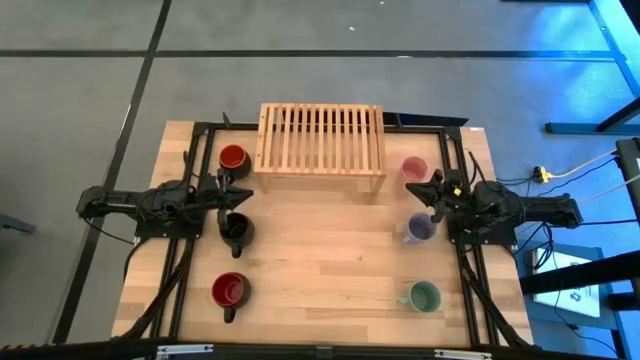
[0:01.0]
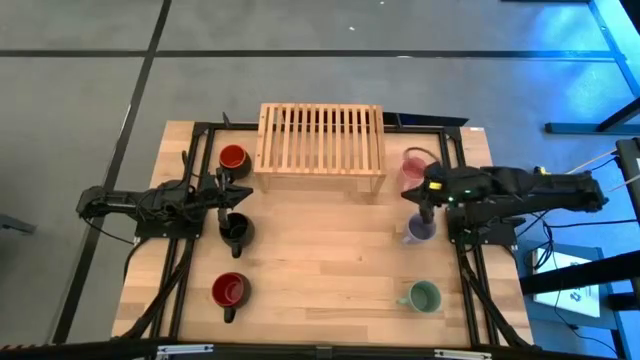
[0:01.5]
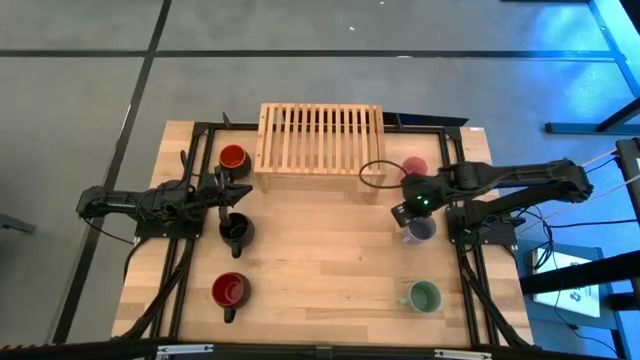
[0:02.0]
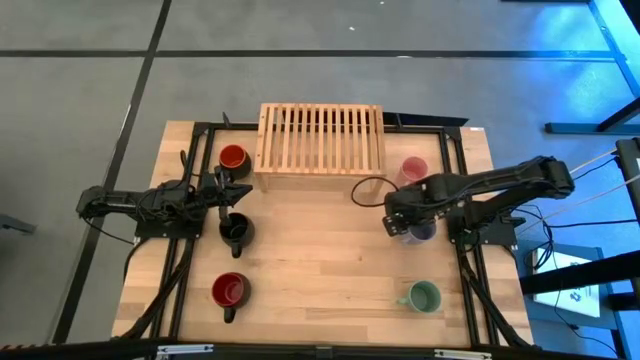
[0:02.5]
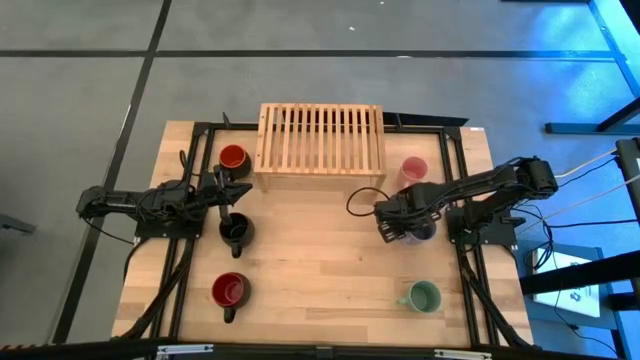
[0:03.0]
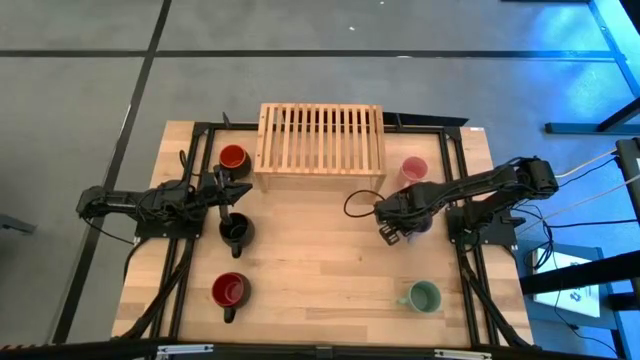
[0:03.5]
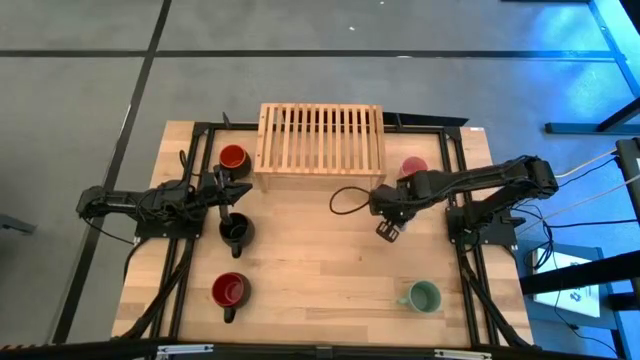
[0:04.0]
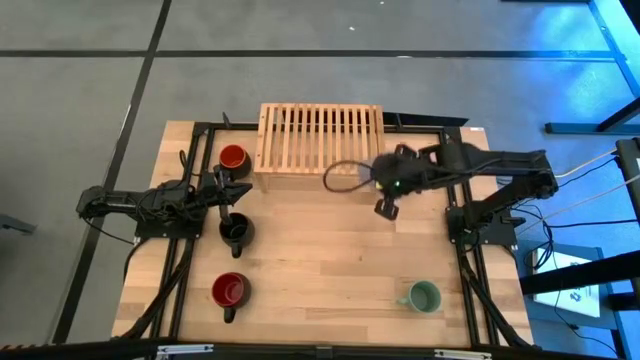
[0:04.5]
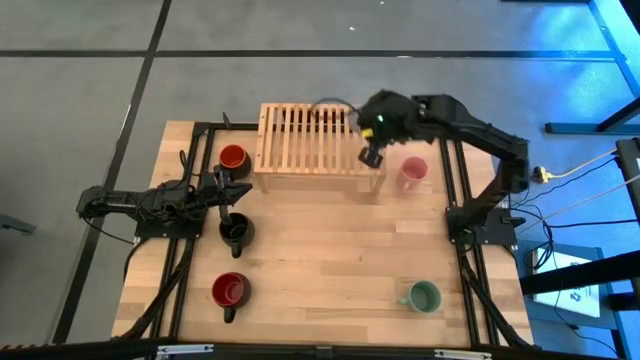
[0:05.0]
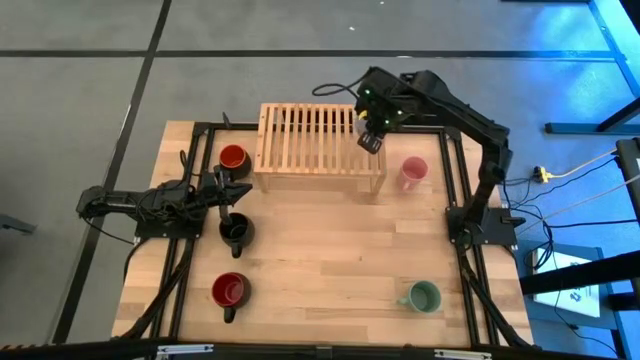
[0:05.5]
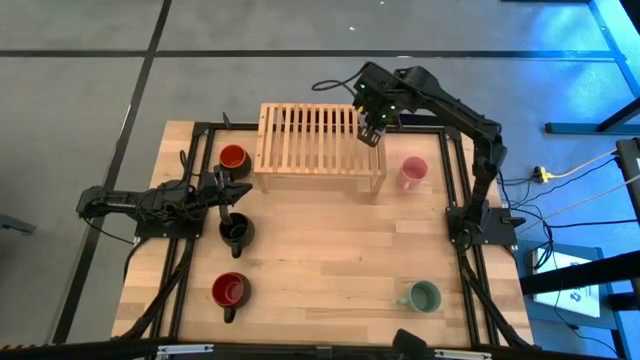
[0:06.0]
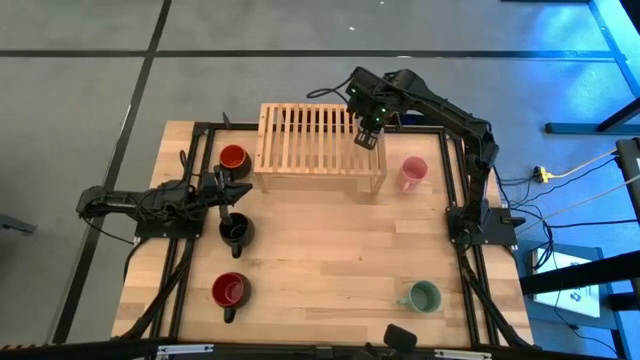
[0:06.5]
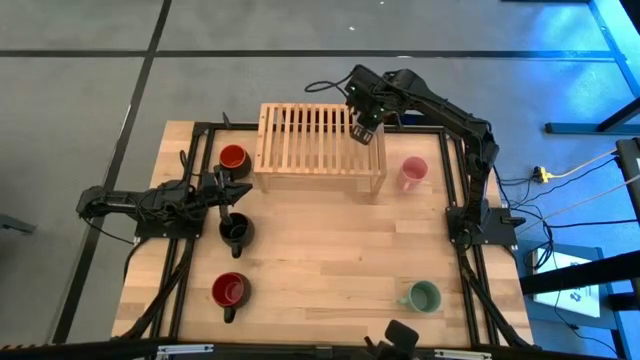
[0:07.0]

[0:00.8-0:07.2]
Task: Place coffee mugs
Put the blue mug on the shelf

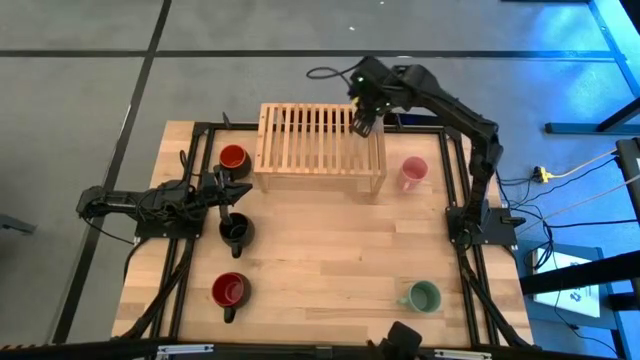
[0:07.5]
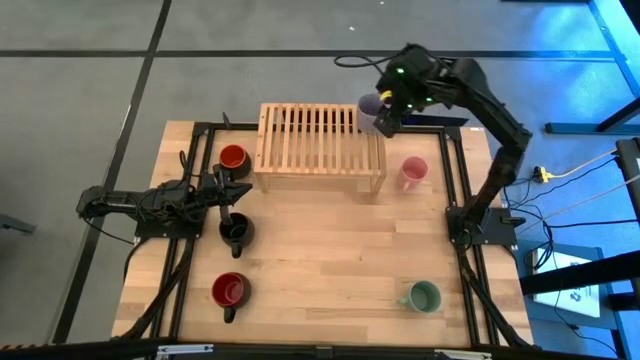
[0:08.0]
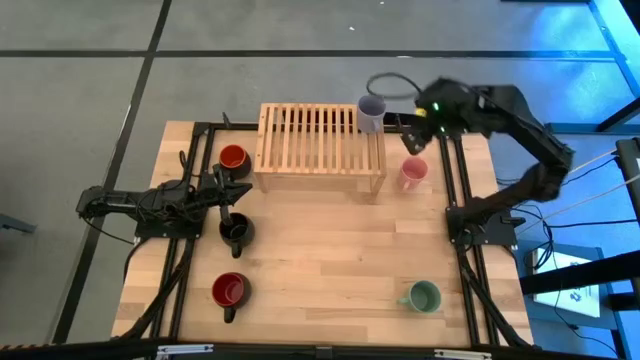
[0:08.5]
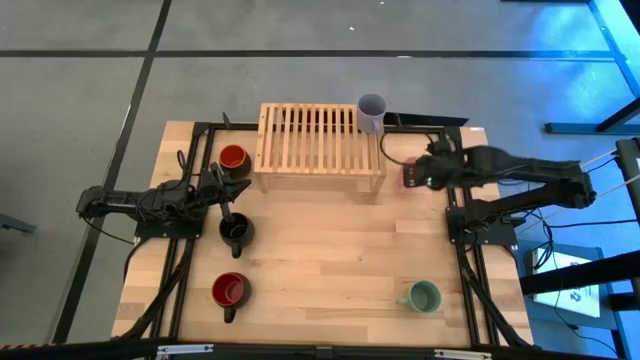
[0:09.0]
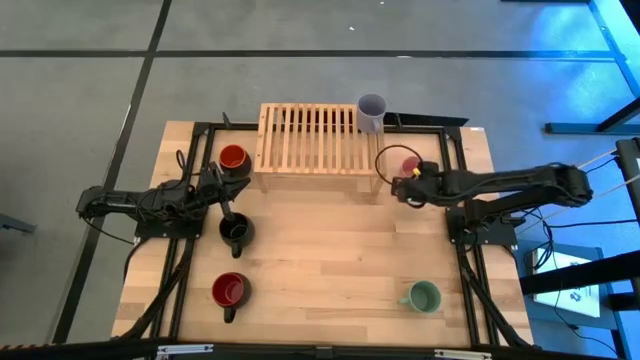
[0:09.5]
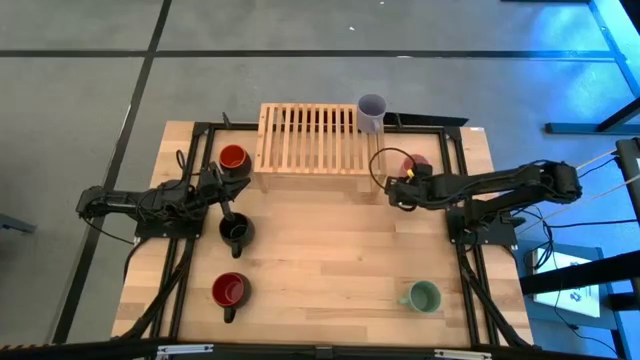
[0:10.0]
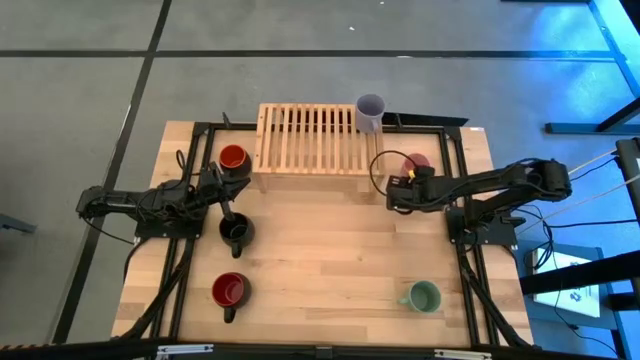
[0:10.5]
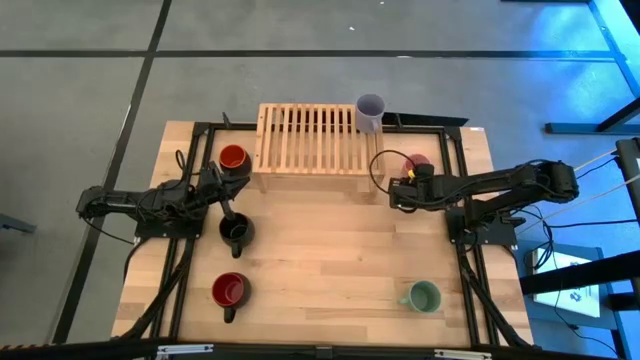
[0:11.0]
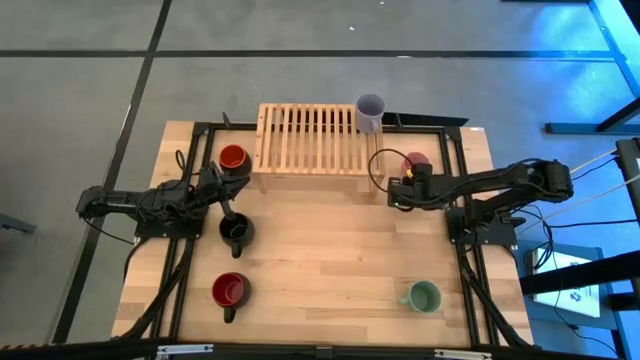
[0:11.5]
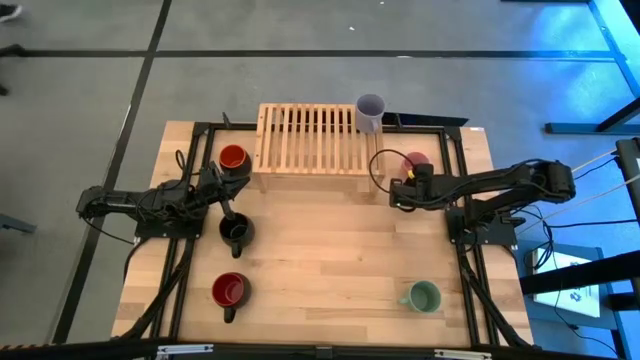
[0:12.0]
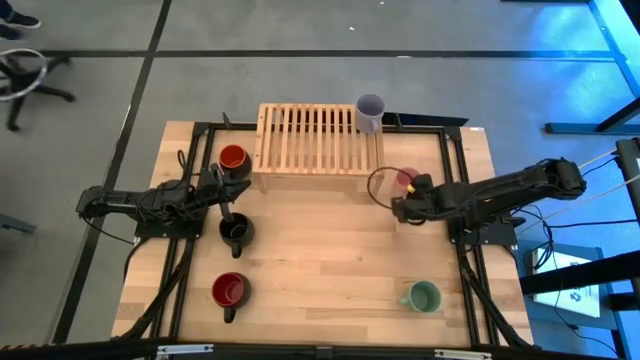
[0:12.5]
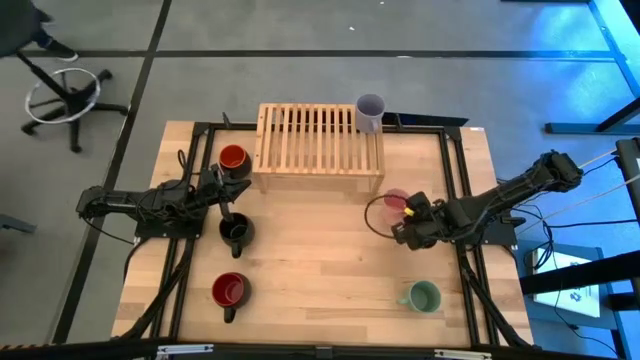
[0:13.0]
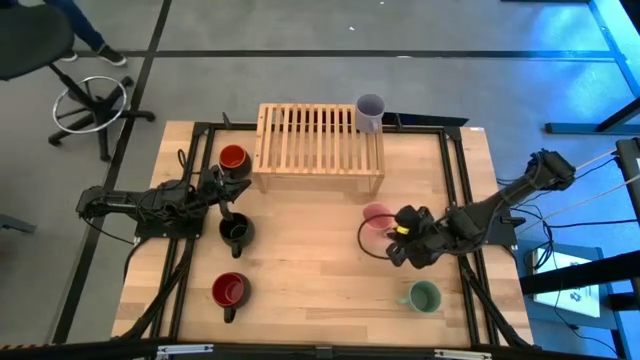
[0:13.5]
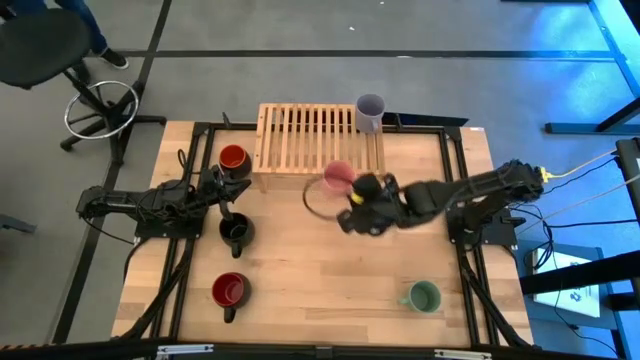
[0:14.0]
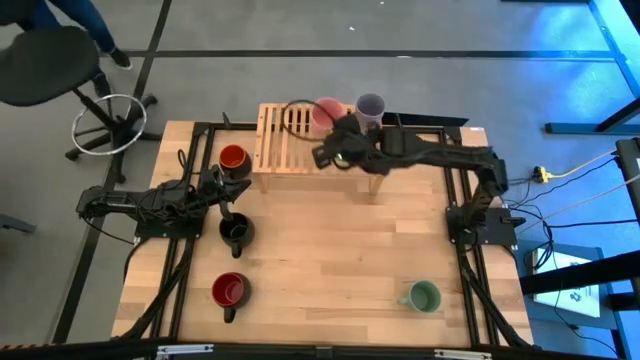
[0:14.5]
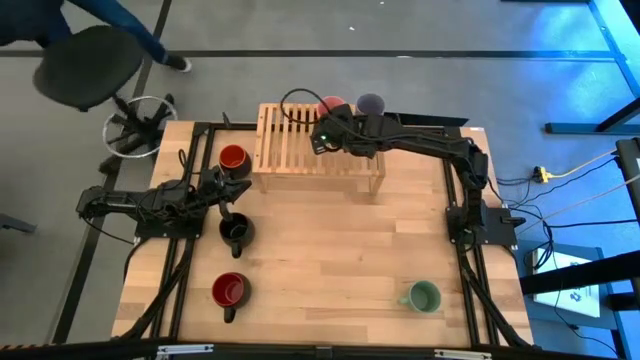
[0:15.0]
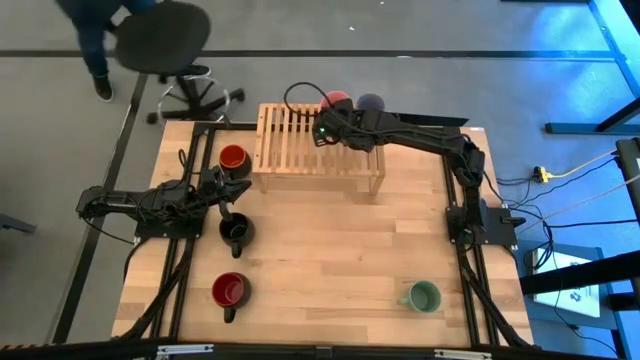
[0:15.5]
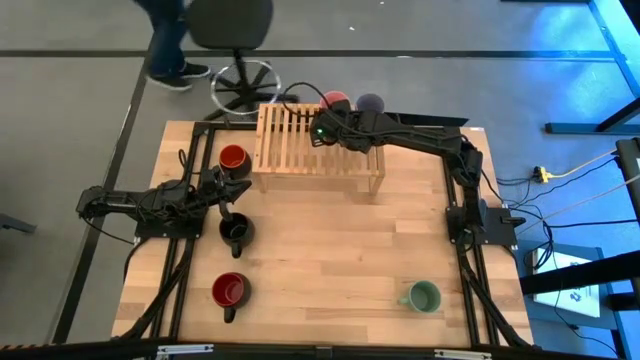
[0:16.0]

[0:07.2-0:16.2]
Put the pink mug on the shelf

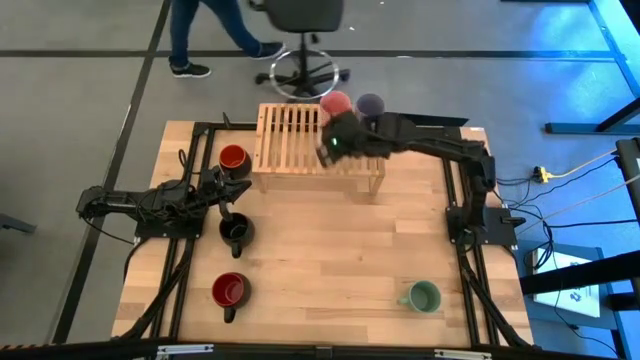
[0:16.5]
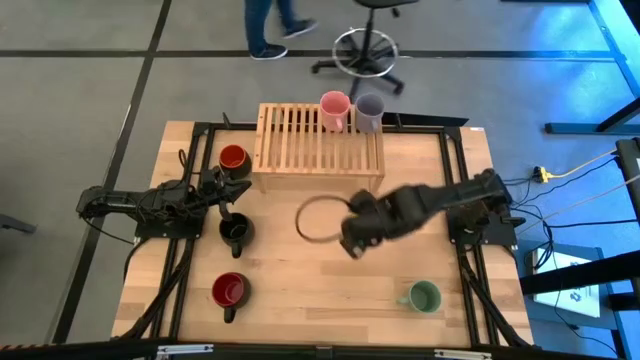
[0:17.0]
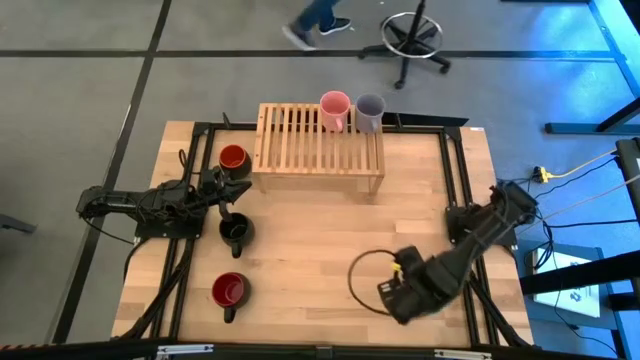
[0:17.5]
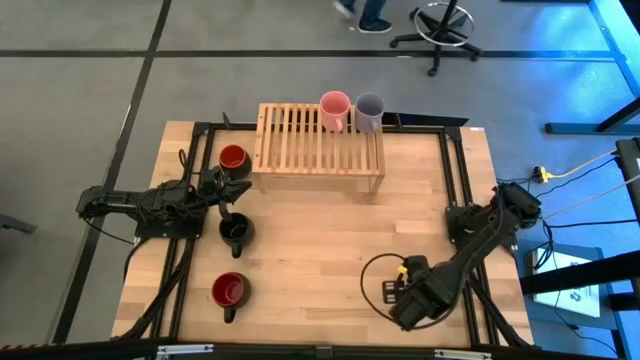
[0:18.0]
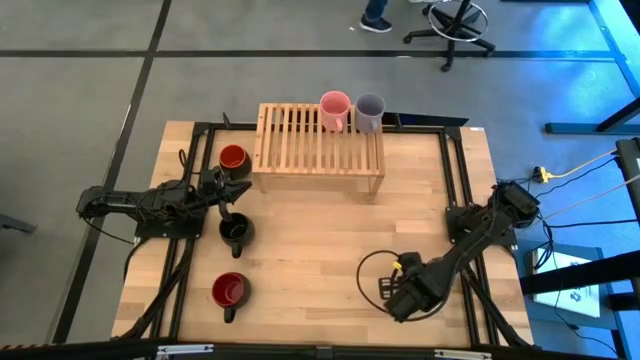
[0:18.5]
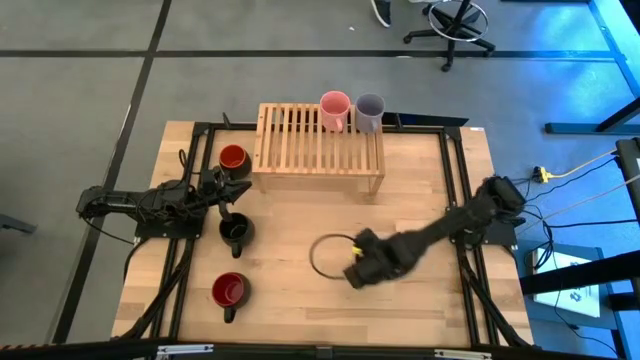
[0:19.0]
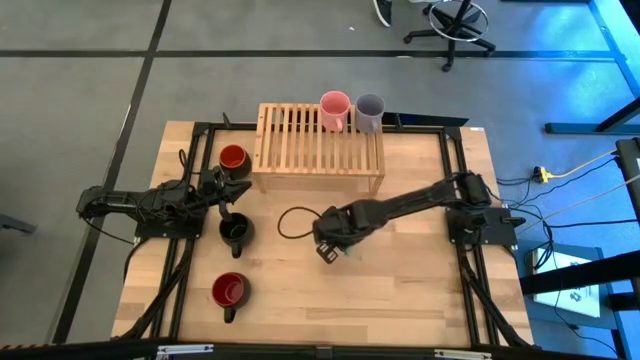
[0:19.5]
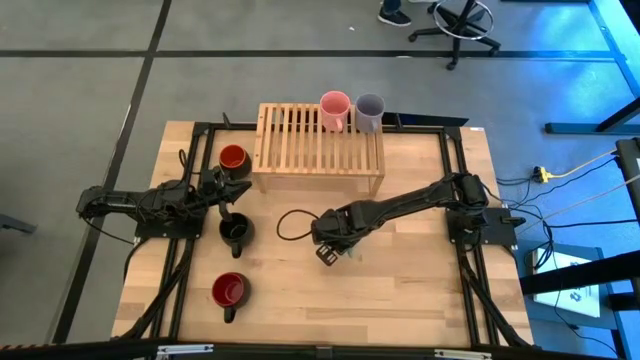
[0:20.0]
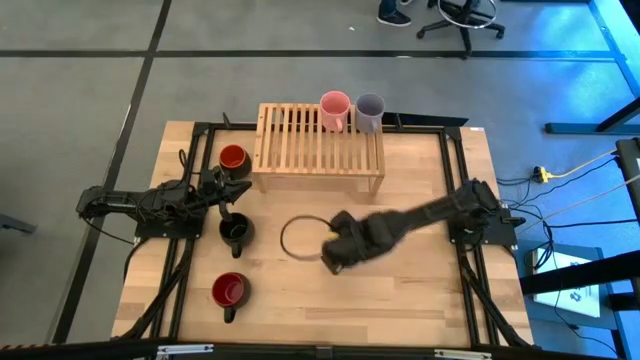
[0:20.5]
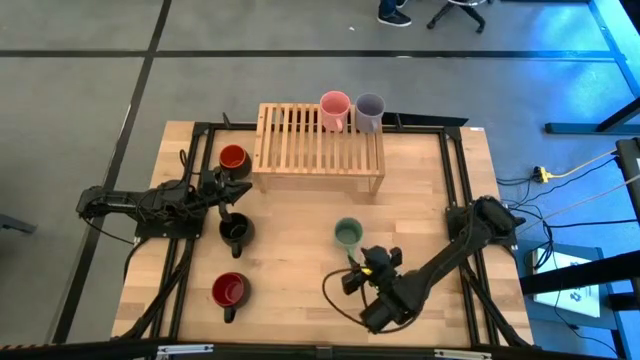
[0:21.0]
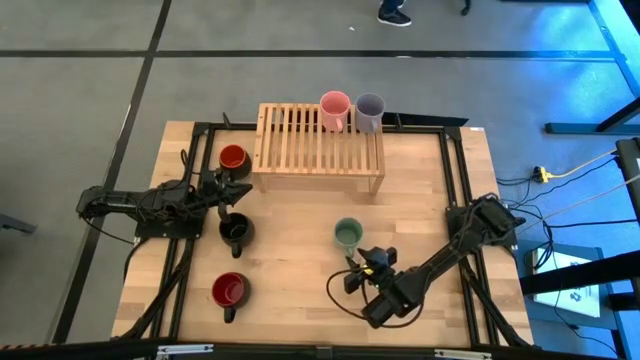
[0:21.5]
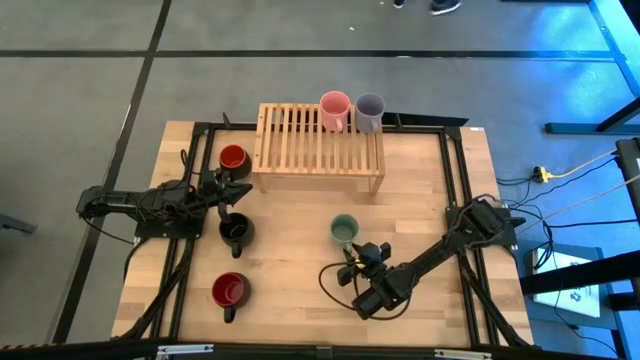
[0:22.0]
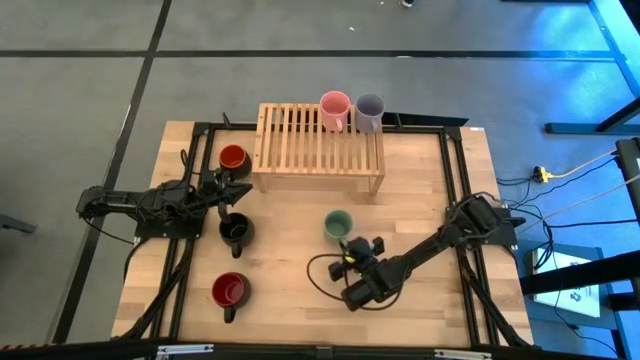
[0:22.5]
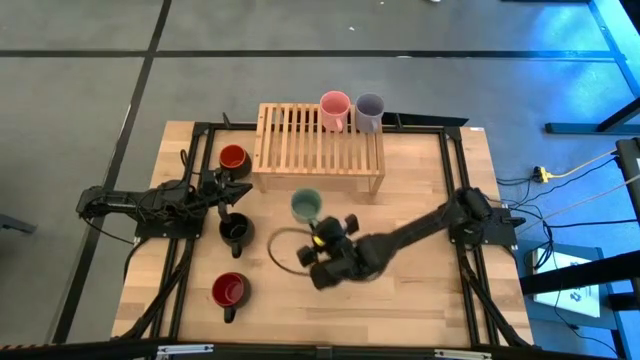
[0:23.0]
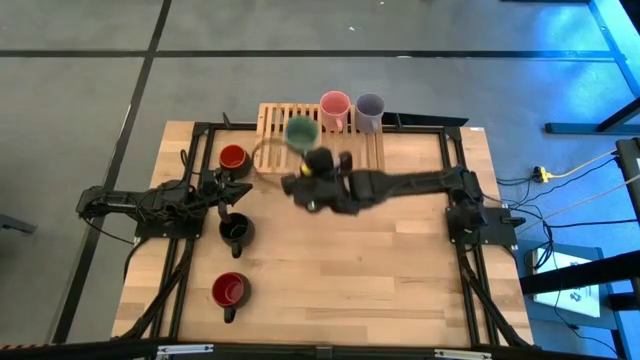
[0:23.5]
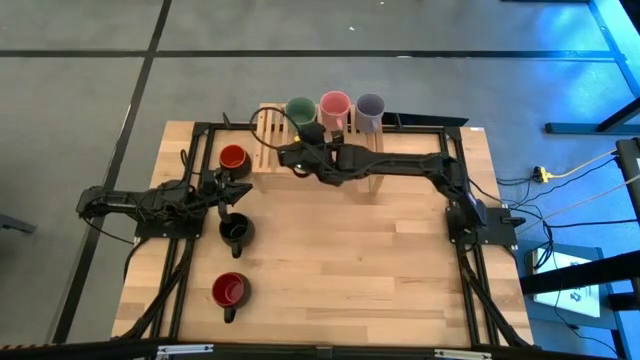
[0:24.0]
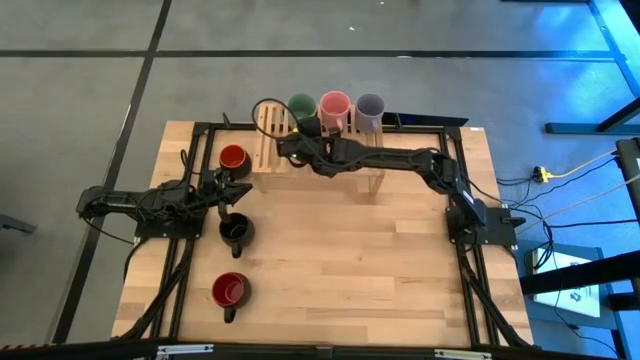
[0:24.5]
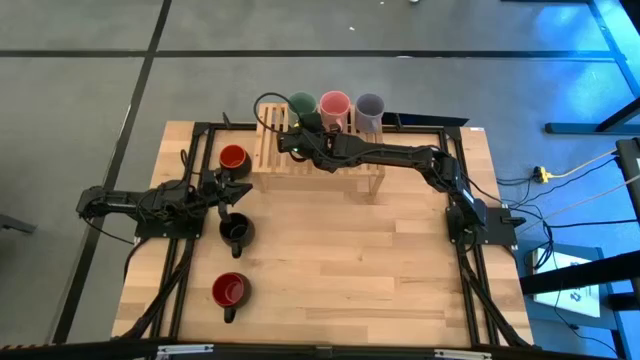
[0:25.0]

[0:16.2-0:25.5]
Put the green mug on the shelf
